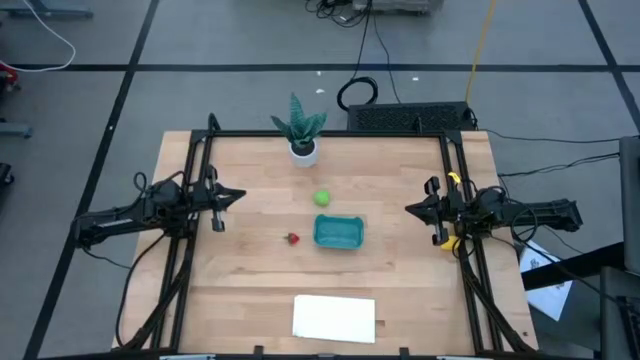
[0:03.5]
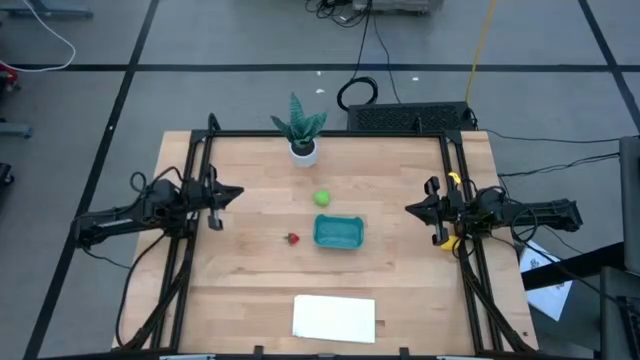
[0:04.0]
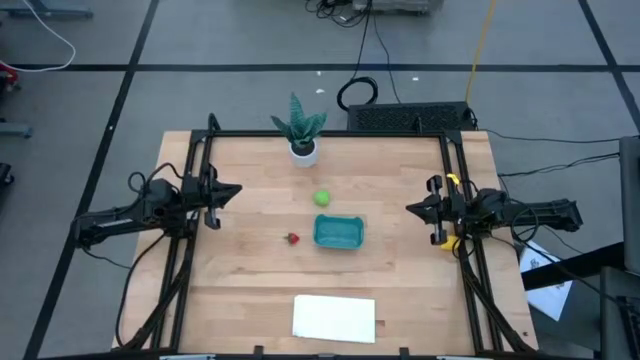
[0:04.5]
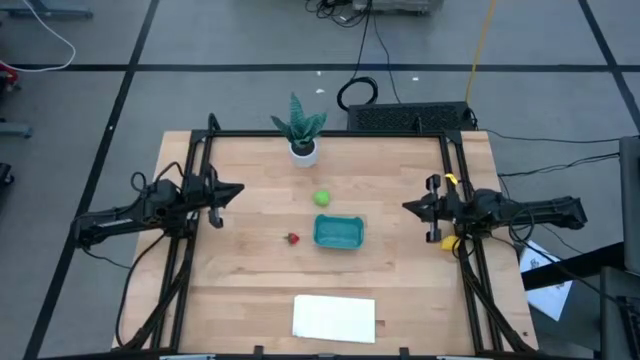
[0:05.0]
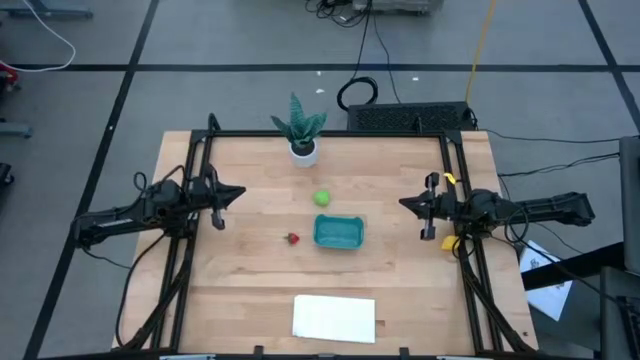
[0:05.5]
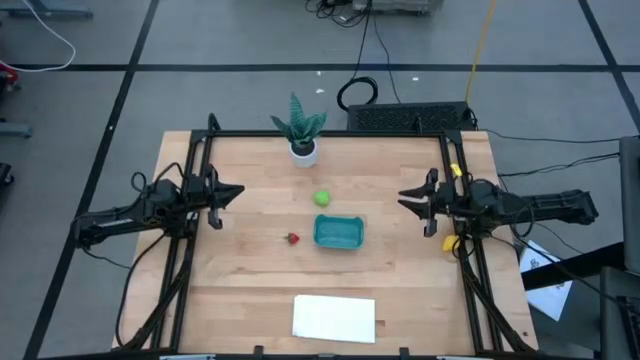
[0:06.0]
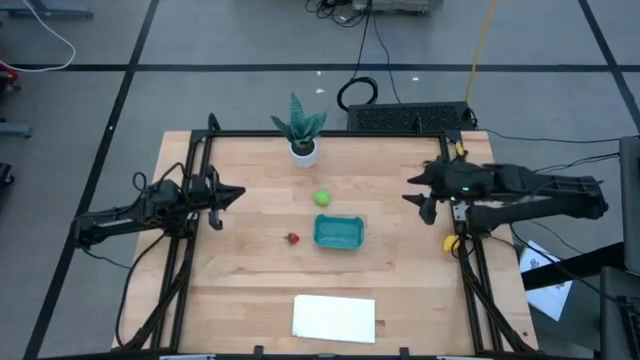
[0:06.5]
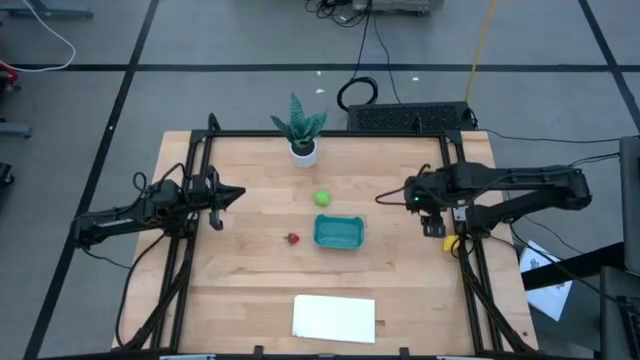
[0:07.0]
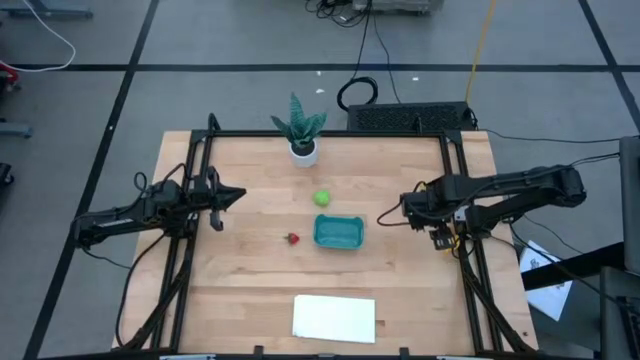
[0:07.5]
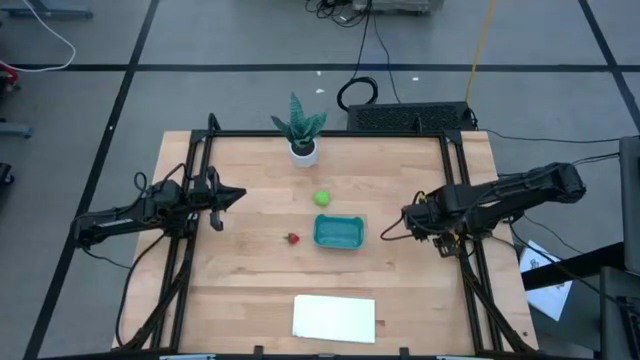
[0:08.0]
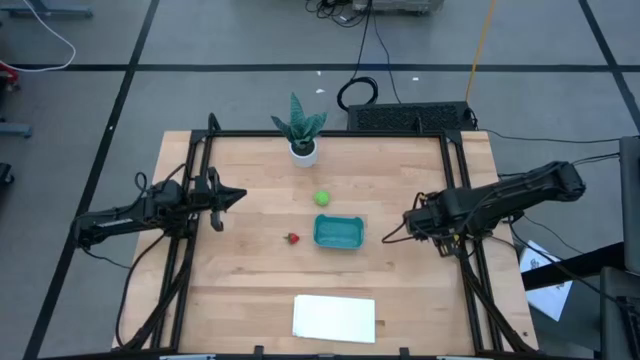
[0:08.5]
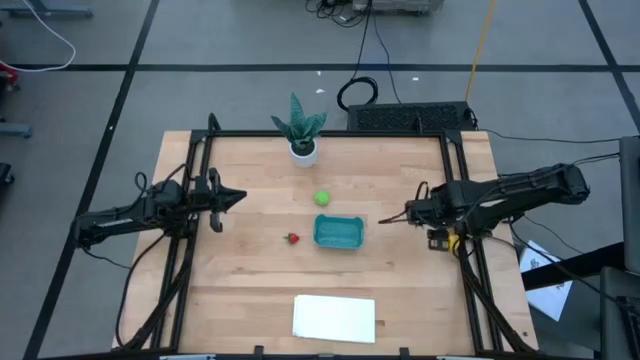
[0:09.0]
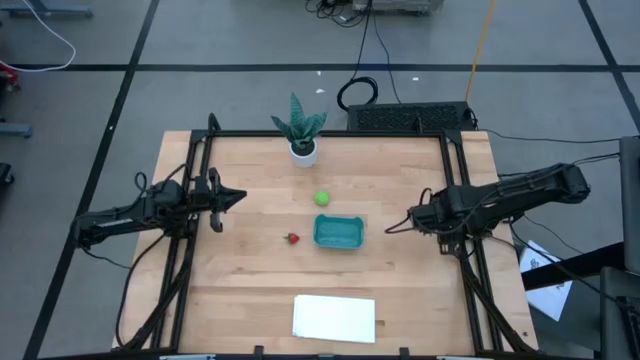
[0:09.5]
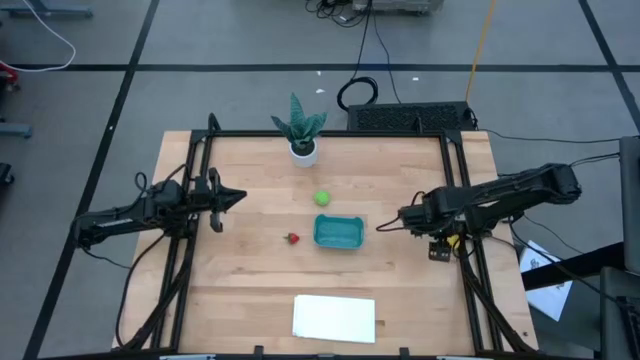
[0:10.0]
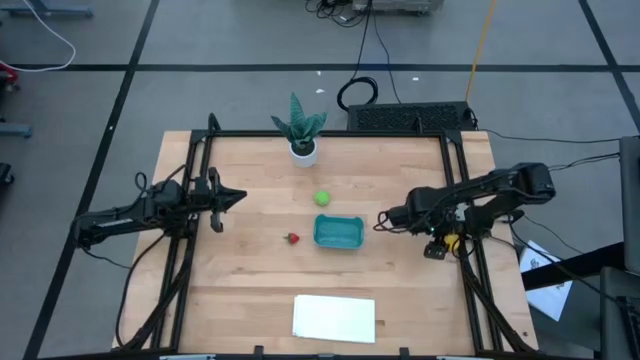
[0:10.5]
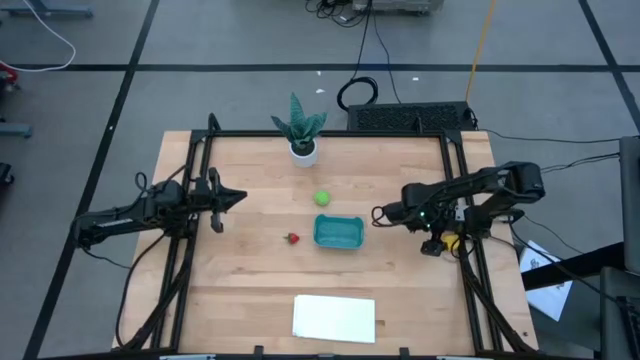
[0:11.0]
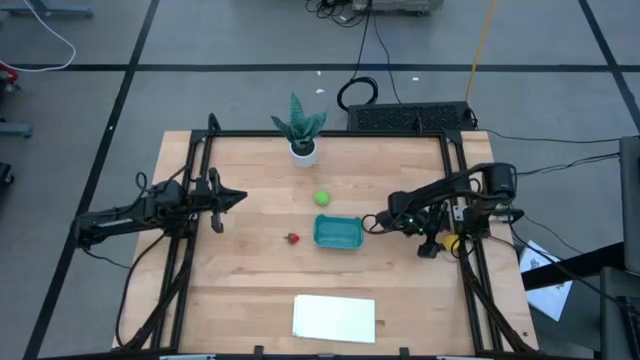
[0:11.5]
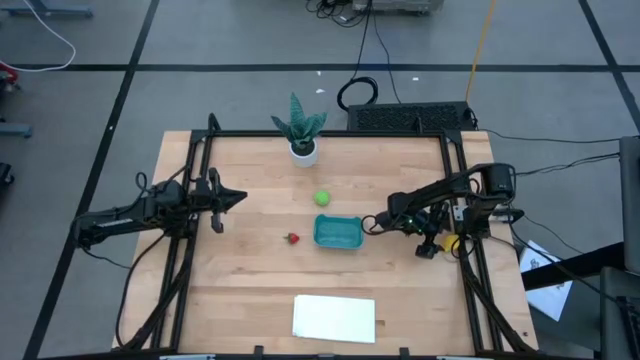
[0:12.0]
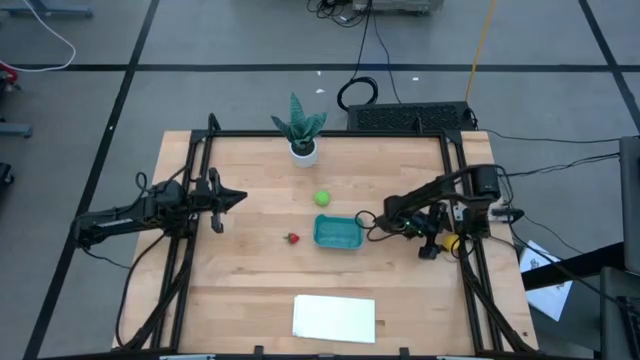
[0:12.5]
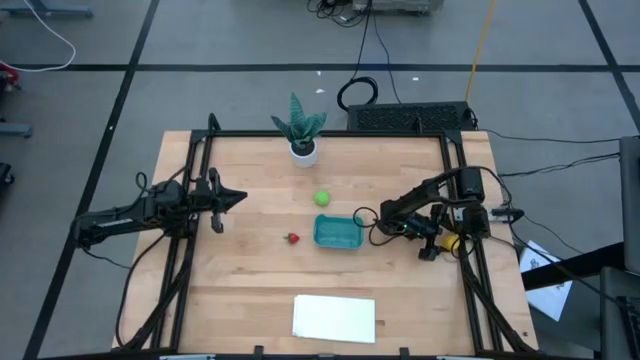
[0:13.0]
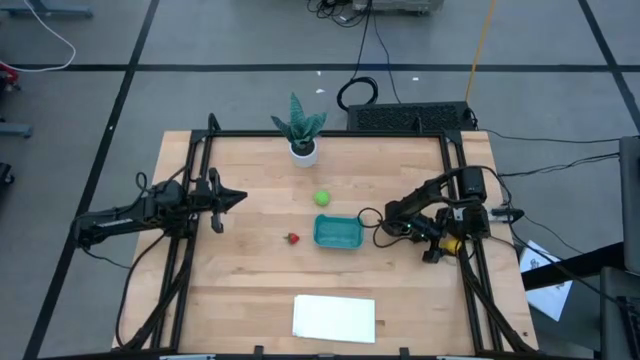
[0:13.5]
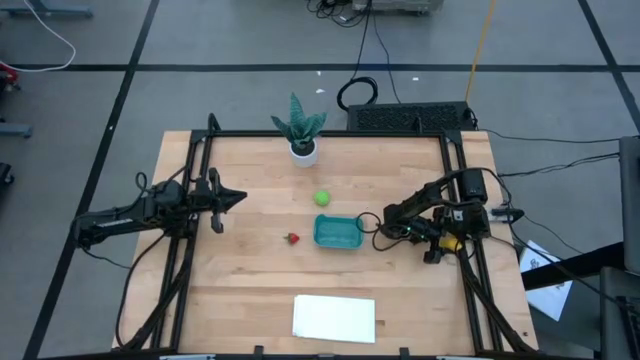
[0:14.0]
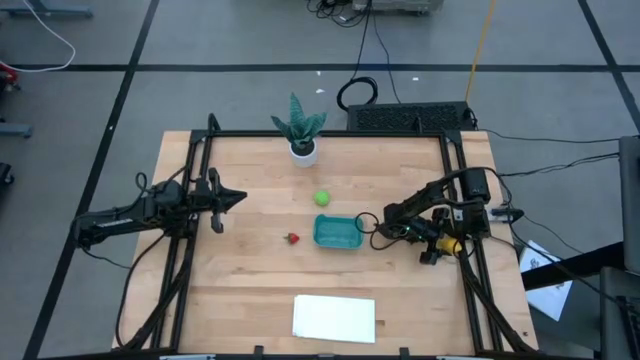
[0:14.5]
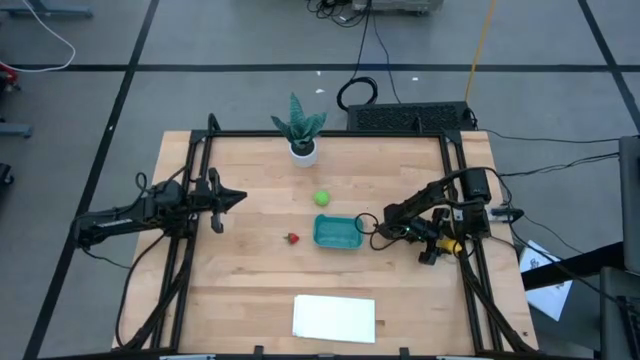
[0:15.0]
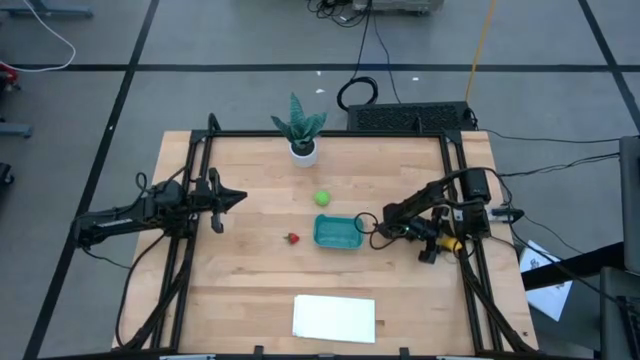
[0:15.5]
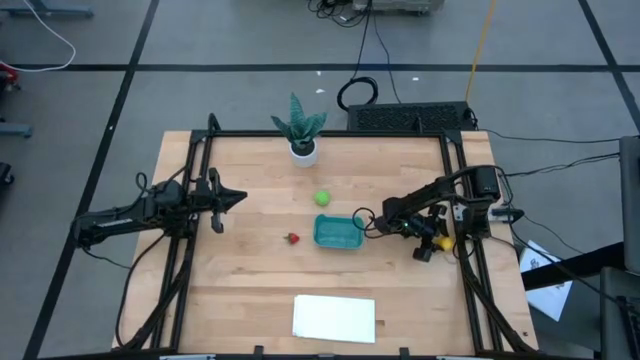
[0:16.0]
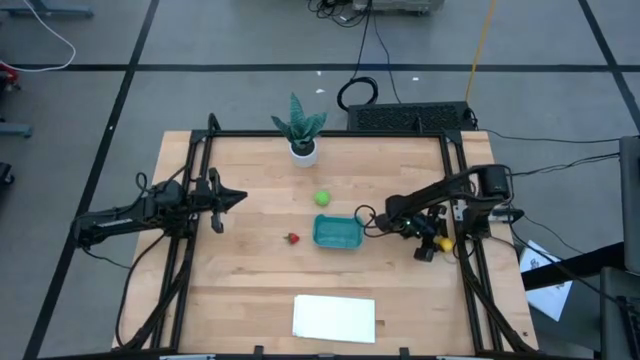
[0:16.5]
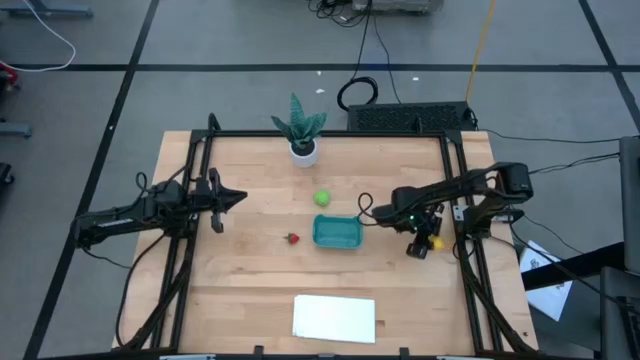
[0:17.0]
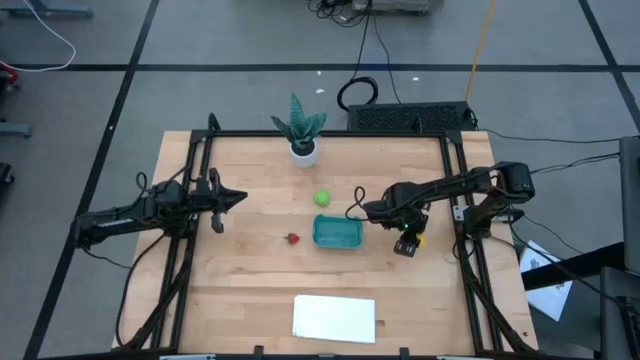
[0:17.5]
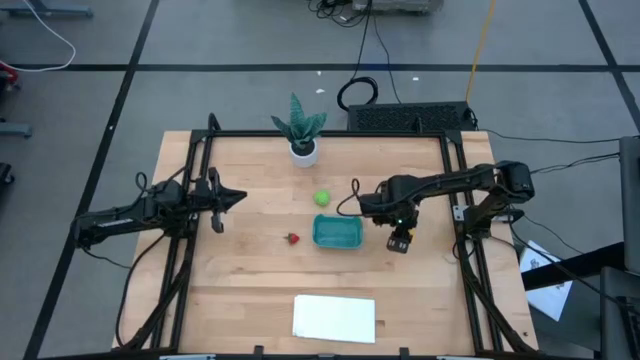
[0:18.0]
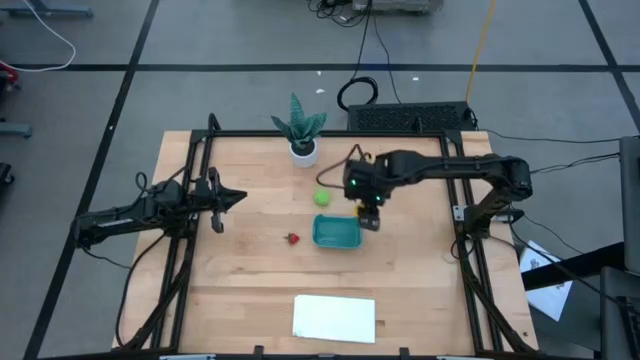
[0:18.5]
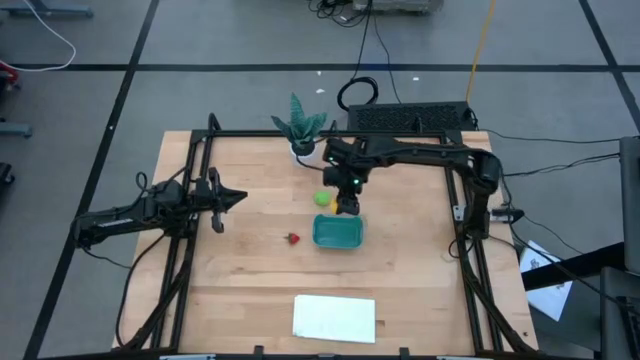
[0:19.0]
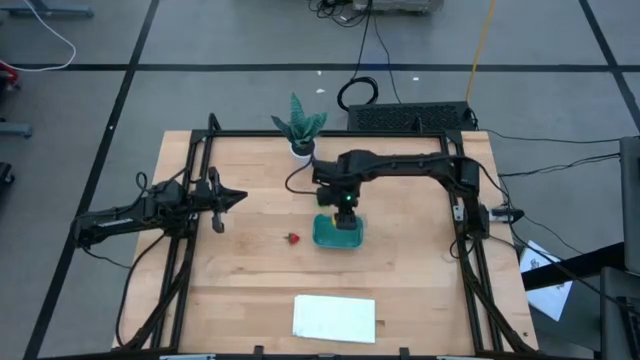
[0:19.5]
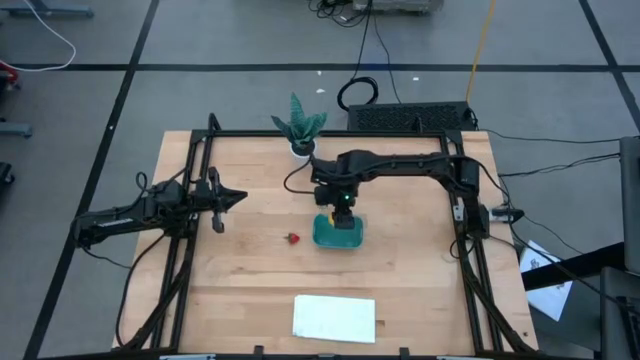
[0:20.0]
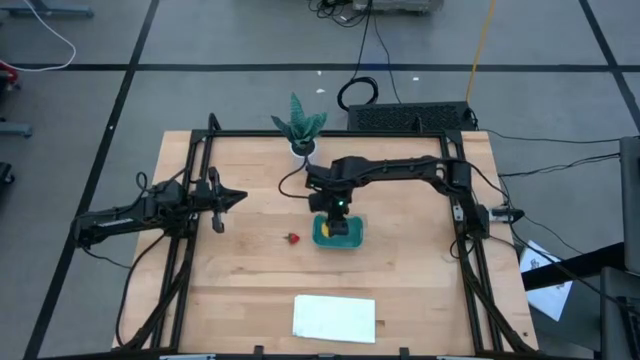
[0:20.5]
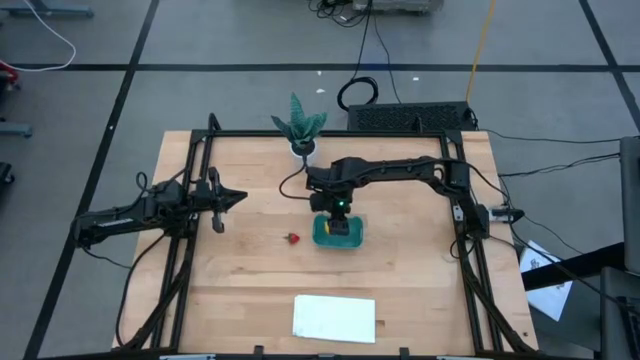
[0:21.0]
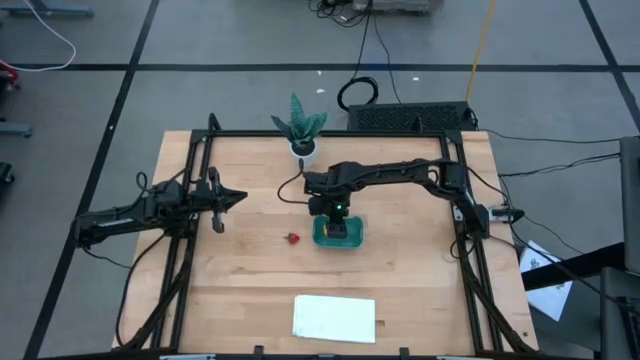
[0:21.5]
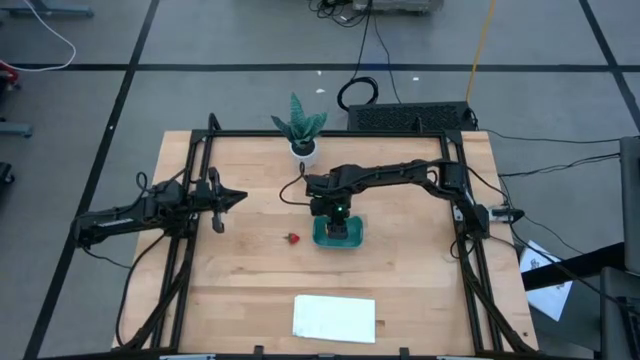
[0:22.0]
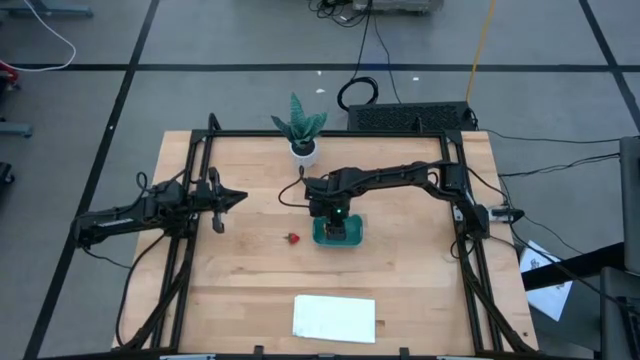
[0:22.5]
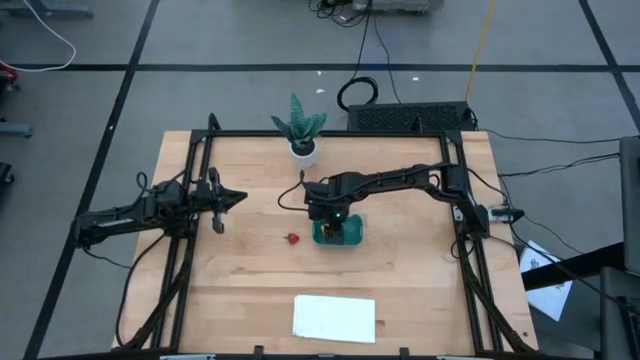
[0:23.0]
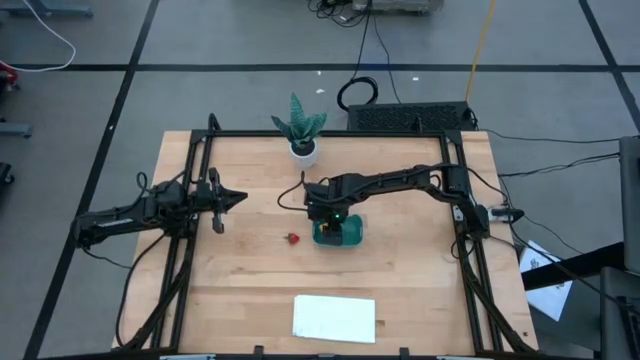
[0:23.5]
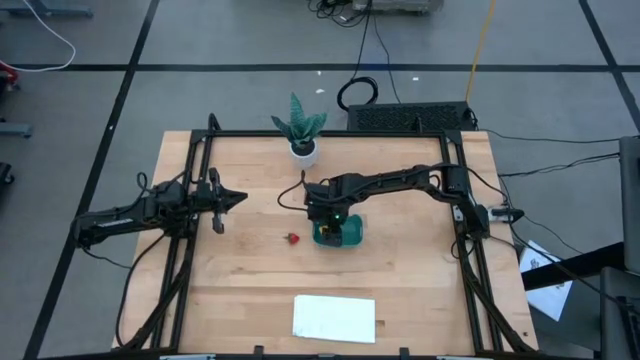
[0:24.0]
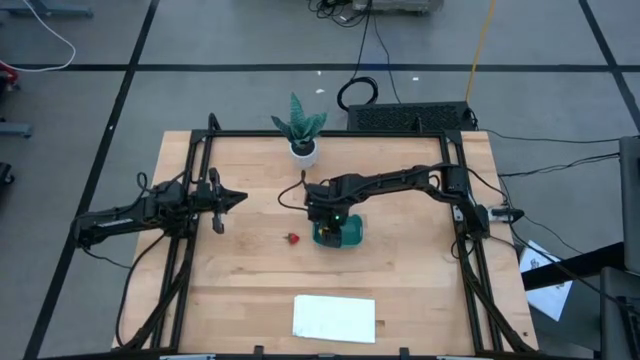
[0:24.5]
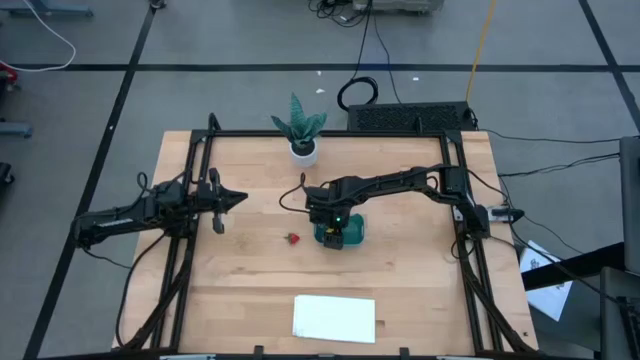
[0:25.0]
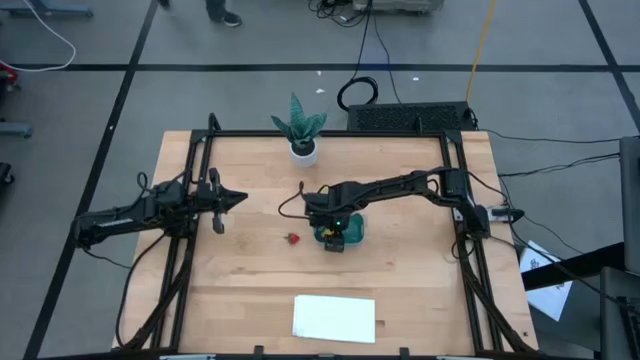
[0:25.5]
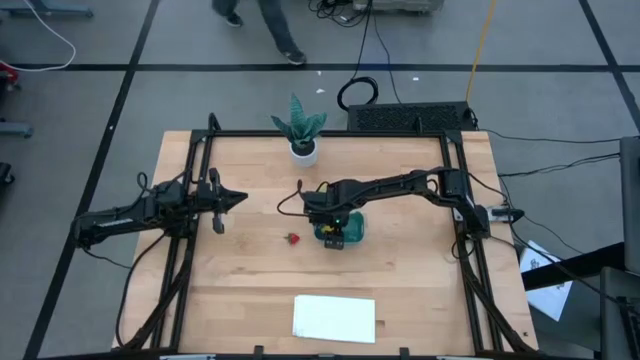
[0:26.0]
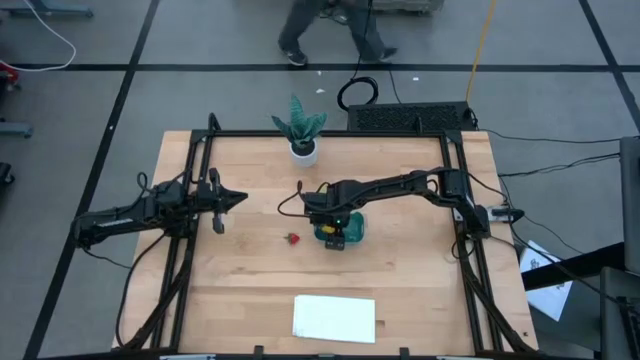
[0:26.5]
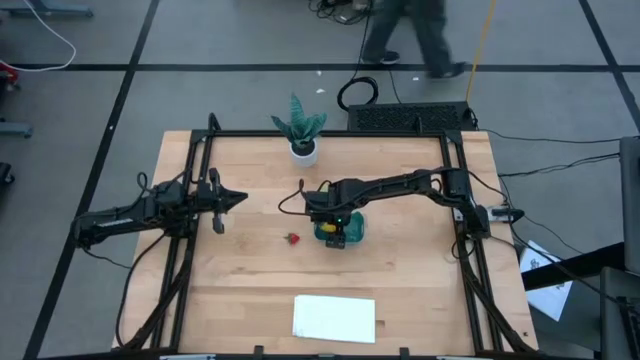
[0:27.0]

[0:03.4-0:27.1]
Task: Pick and placing Produce into tupperware
Put the lemon into the green bin
